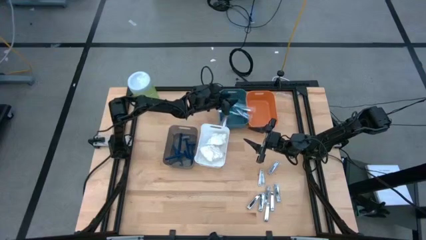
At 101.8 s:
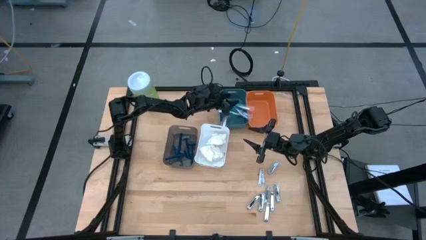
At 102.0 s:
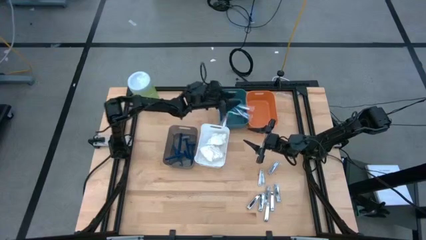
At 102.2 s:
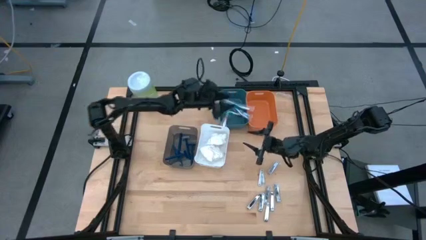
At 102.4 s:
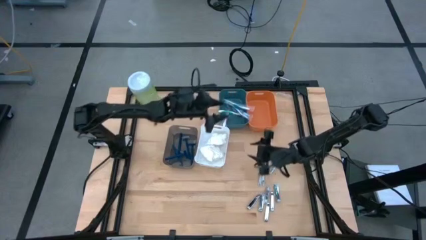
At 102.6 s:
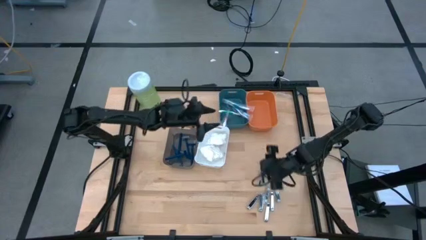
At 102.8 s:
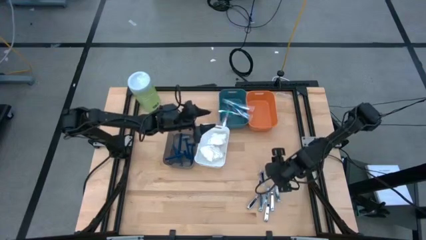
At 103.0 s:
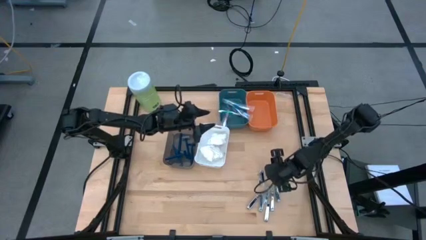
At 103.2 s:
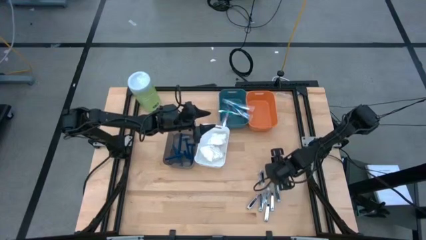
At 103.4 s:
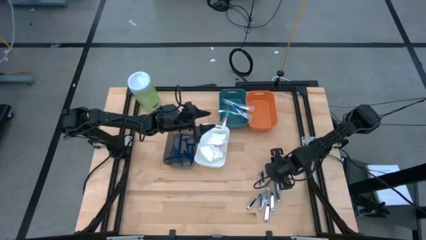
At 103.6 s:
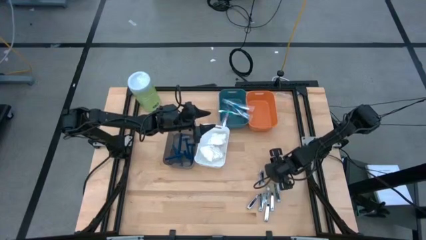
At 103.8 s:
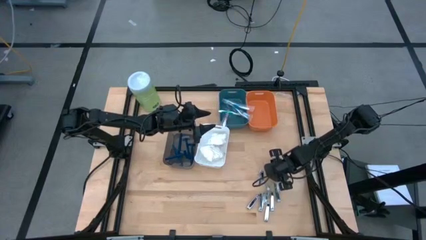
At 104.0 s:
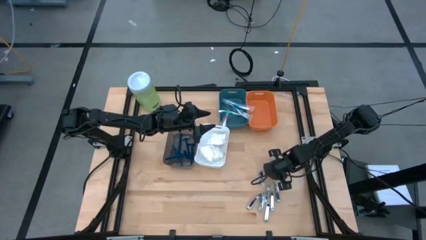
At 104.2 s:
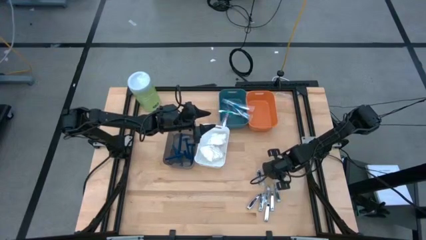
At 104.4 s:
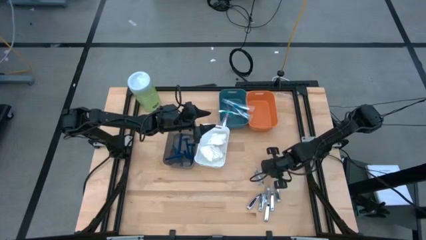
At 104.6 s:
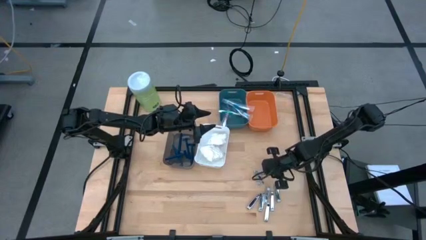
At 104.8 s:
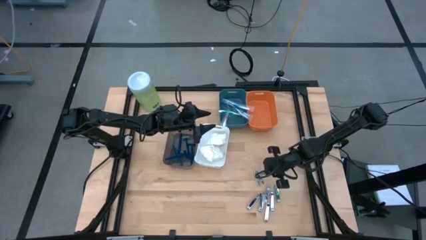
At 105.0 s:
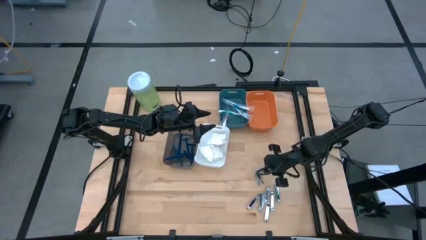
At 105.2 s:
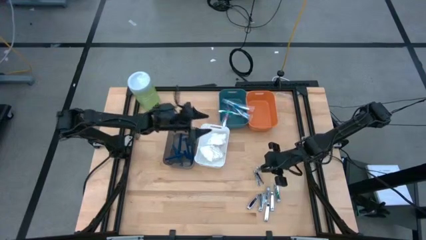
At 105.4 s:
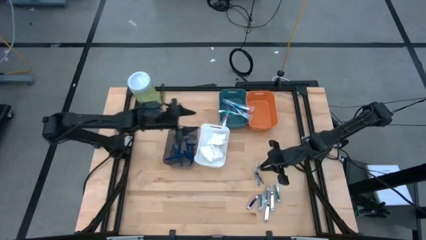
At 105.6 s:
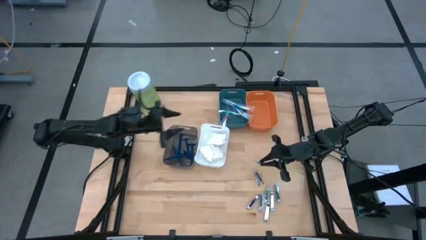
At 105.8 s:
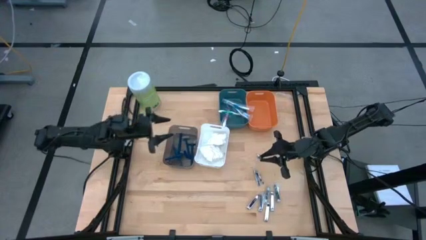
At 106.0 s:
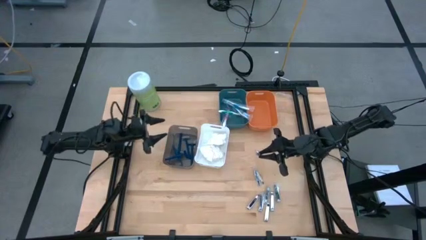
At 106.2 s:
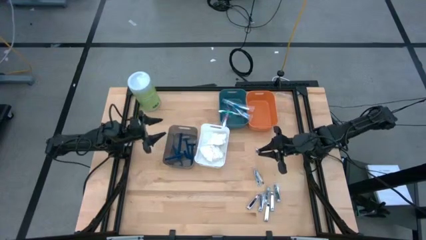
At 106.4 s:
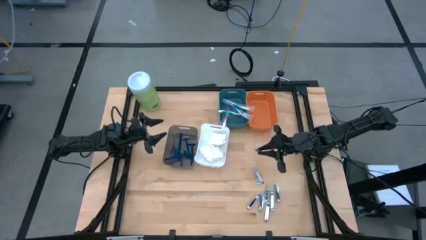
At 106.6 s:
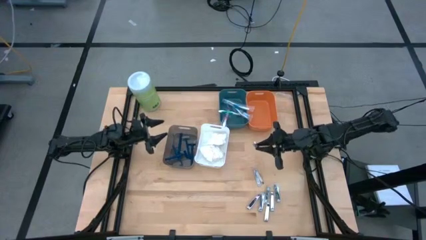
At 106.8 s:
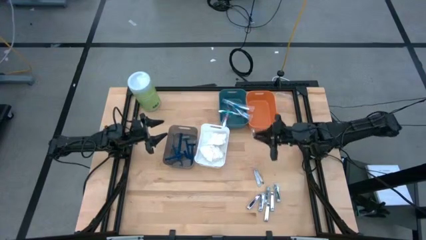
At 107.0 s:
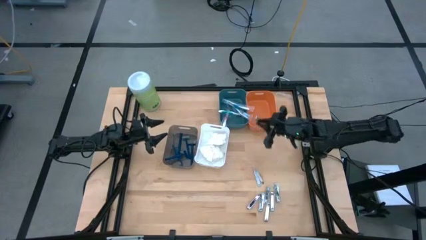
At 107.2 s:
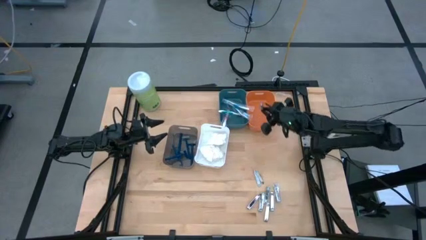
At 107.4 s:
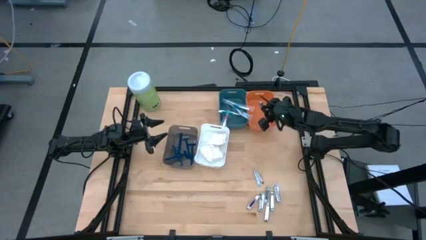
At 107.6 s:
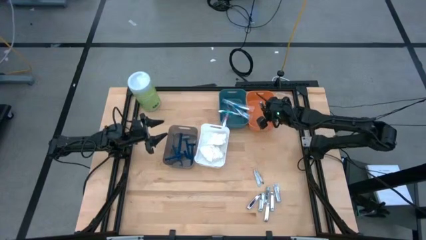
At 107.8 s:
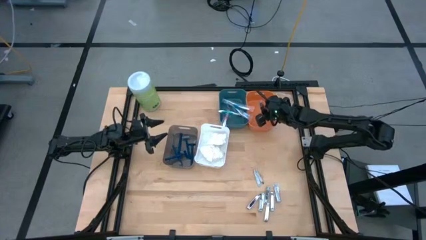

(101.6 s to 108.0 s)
Task: Pick & Place Travel size toiletries
Put the silver nail cutter into the orange bin

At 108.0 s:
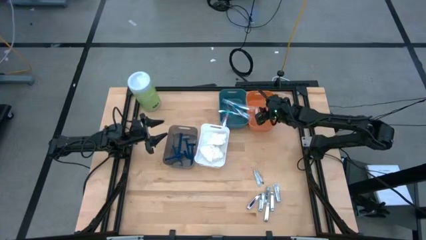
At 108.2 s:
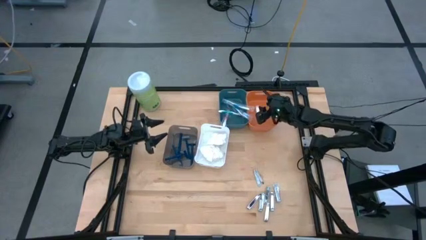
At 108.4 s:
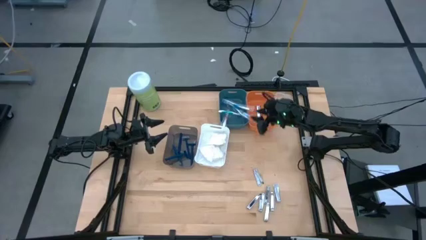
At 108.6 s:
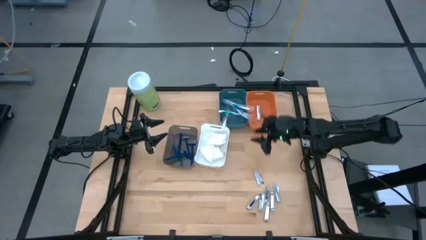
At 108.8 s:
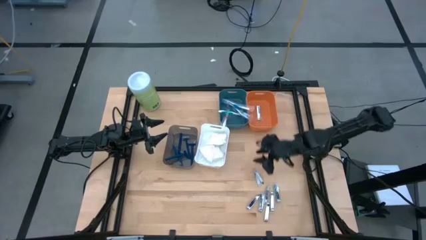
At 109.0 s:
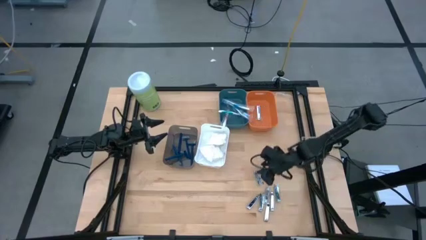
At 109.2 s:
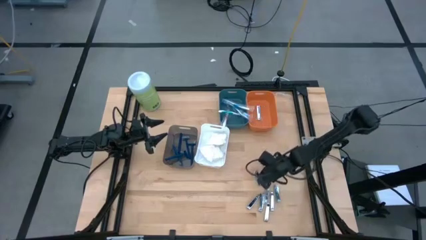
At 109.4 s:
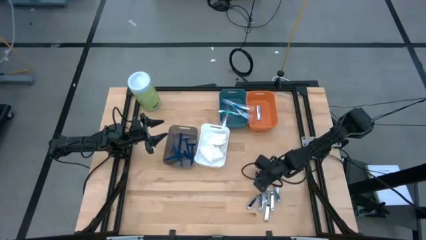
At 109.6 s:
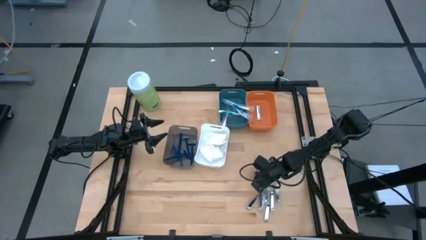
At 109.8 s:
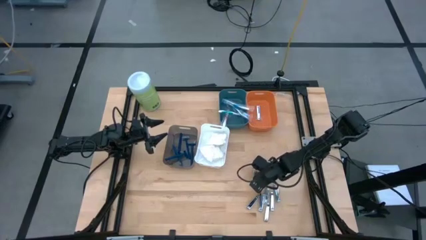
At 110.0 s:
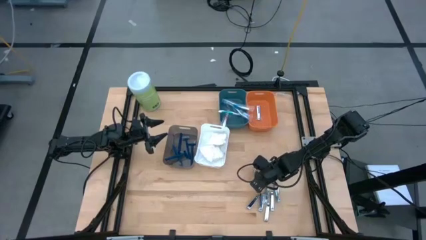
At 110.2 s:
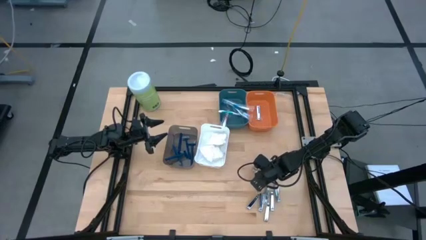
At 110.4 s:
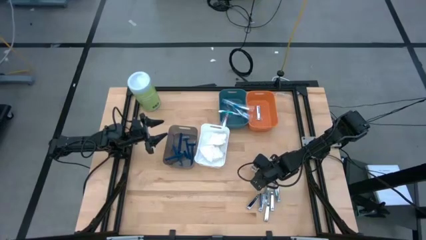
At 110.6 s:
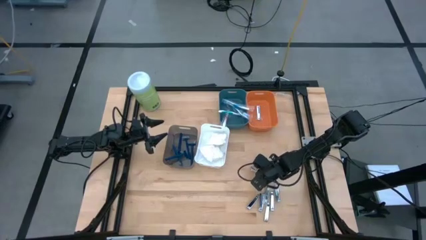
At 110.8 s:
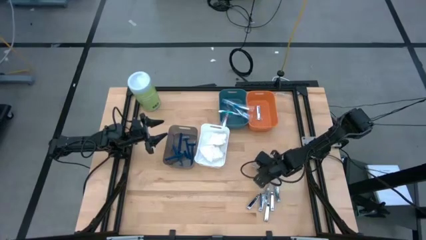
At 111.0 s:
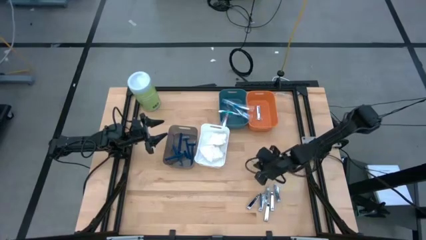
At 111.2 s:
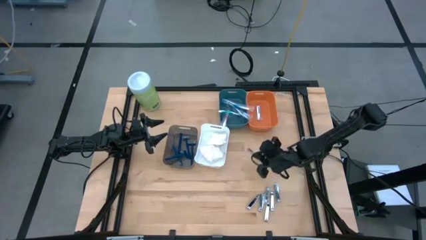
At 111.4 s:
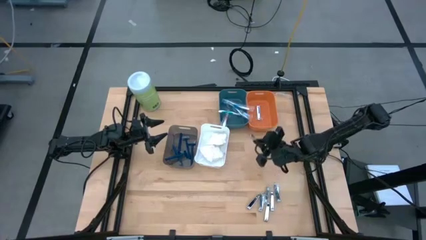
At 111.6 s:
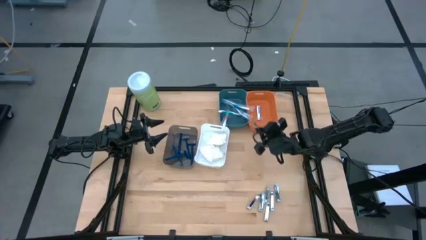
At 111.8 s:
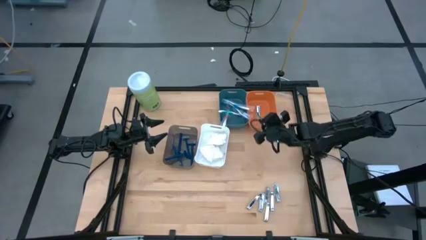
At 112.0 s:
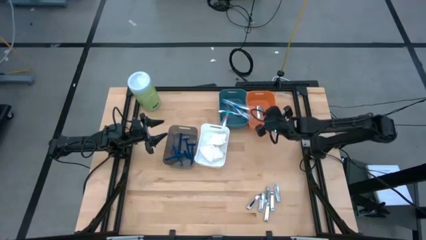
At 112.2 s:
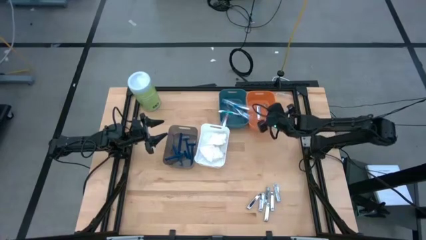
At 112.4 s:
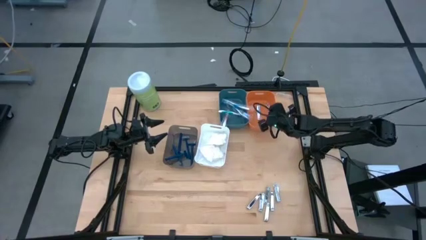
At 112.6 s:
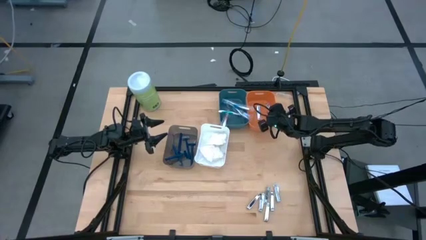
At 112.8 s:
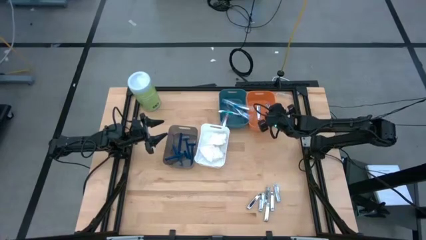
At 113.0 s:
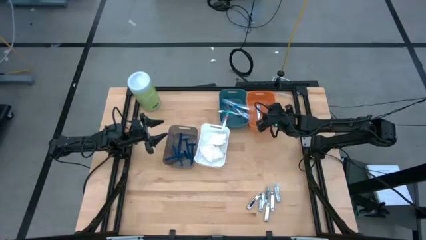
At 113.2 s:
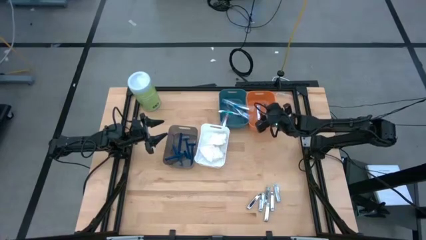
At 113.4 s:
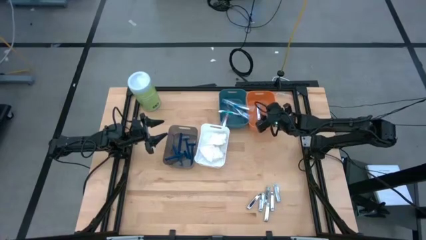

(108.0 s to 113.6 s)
Put the silver nail cutter into the orange bin

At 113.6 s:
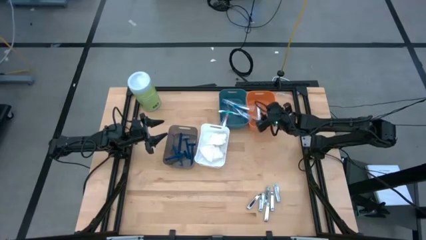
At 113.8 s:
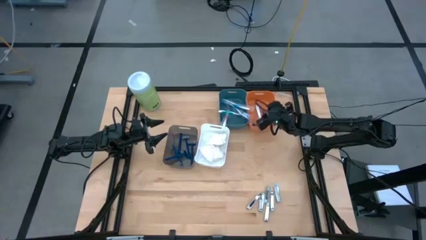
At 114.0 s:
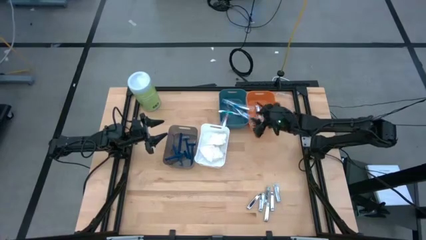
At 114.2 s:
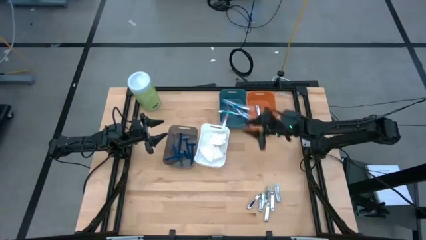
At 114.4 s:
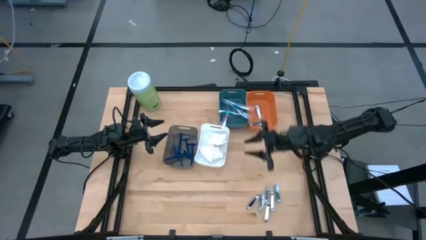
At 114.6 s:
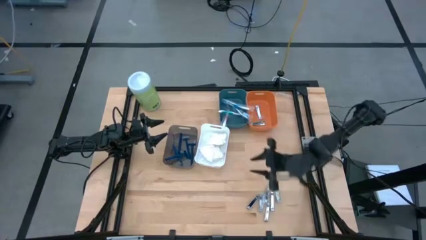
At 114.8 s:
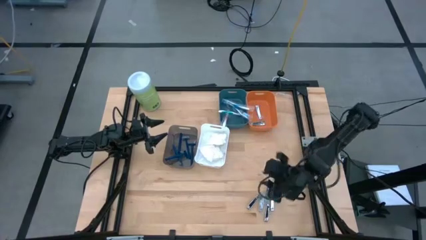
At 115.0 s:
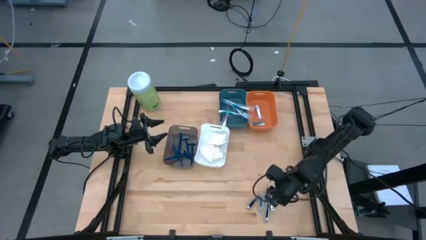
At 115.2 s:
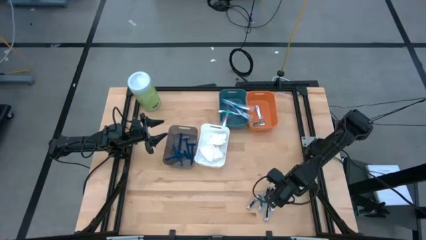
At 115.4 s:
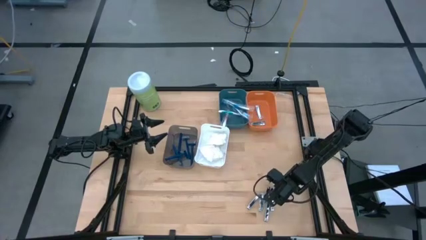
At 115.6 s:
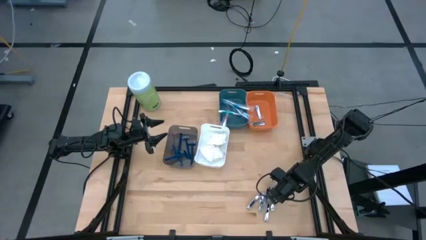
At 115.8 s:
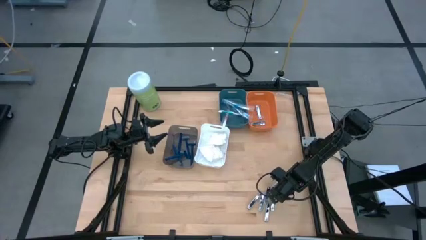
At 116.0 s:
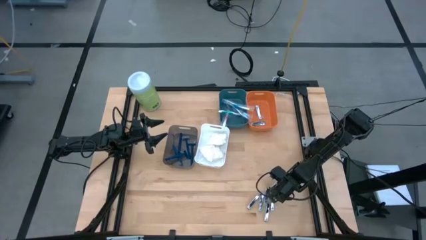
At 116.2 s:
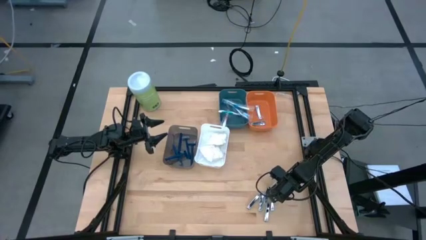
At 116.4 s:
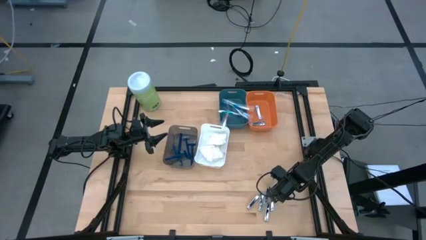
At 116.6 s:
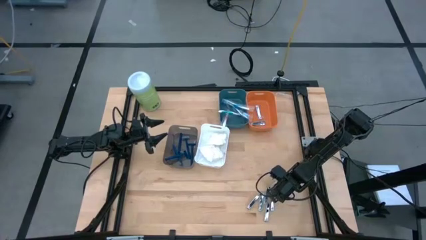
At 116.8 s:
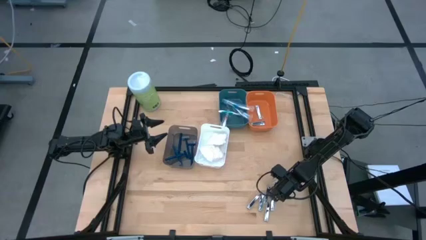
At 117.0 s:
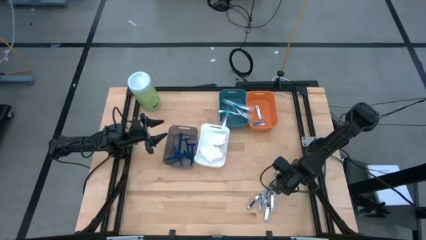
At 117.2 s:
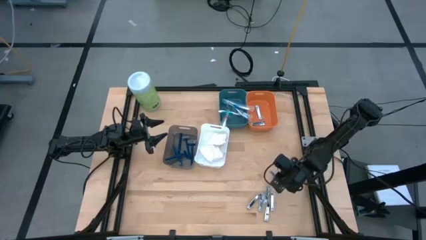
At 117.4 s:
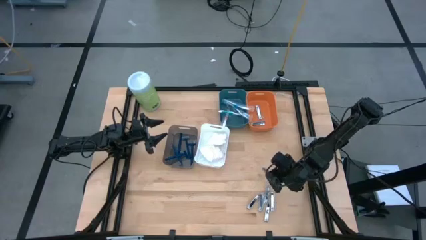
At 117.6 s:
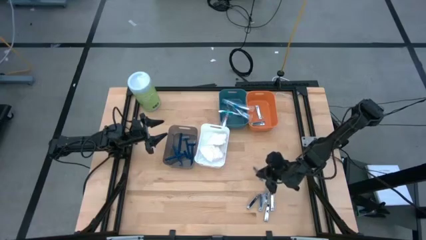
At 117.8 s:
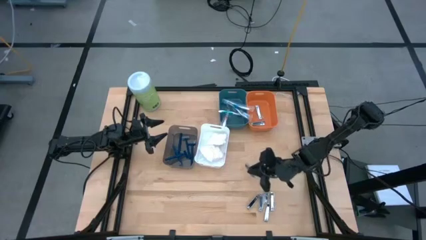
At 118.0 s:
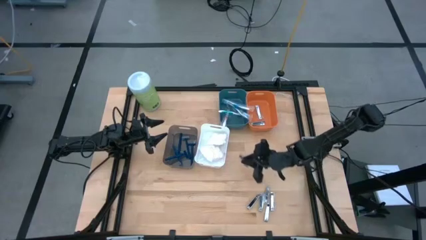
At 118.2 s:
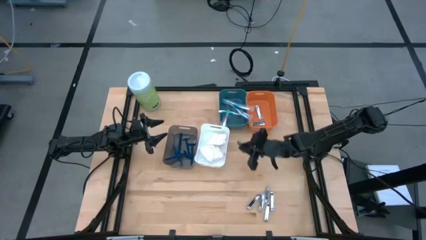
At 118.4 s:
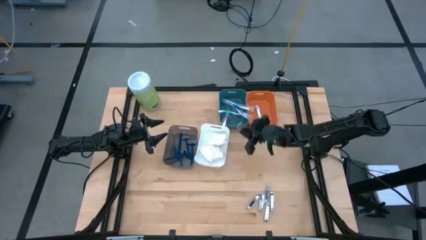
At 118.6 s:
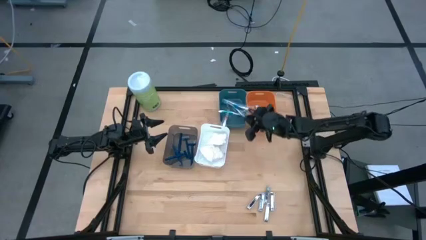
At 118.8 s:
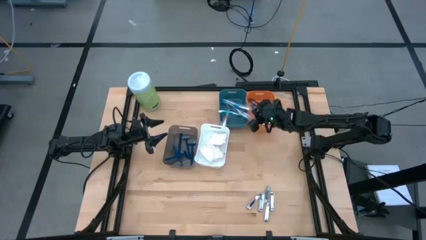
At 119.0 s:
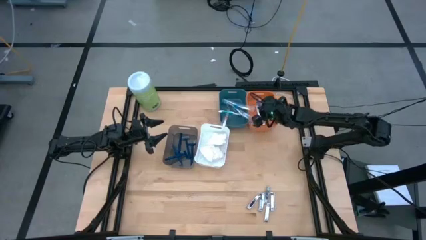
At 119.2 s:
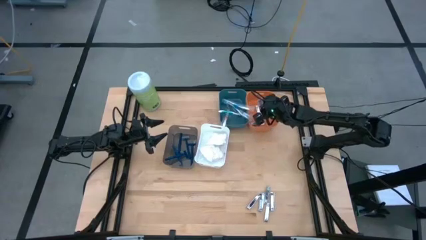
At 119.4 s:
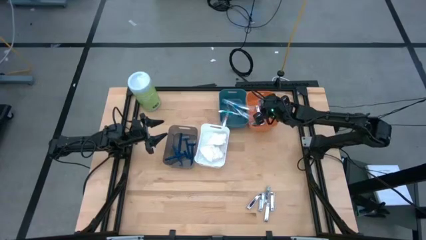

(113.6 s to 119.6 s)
Put the silver nail cutter into the orange bin
